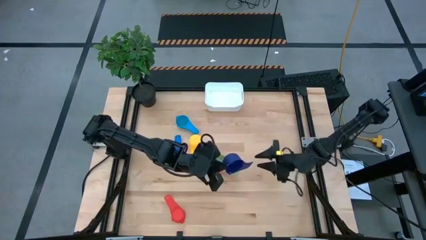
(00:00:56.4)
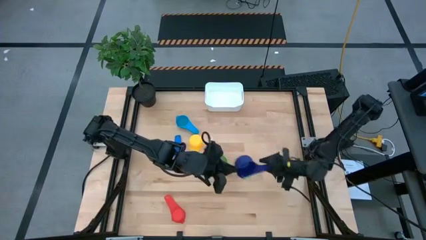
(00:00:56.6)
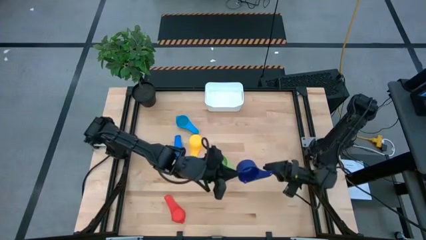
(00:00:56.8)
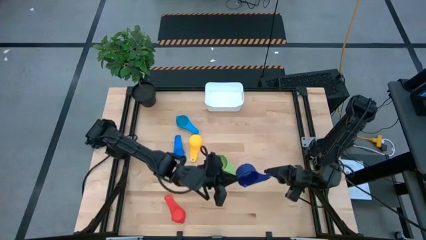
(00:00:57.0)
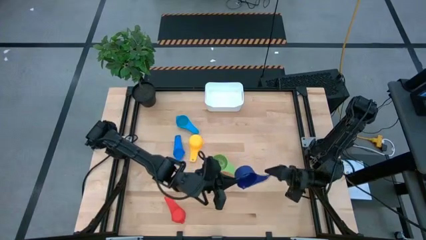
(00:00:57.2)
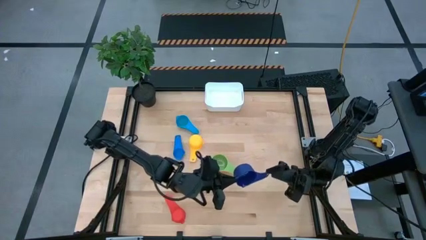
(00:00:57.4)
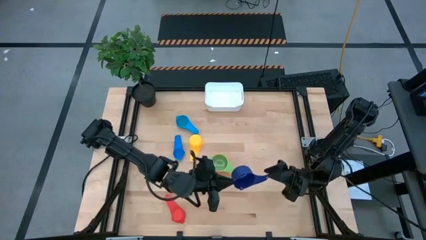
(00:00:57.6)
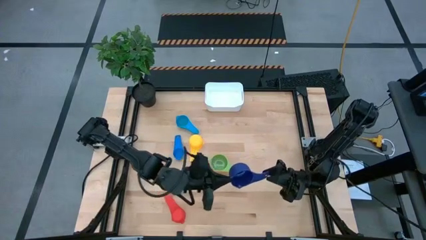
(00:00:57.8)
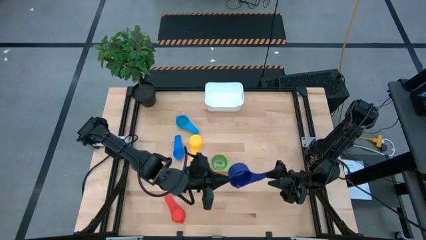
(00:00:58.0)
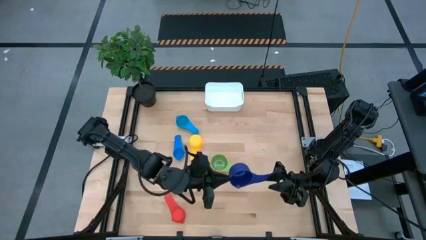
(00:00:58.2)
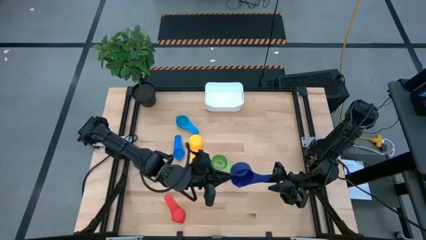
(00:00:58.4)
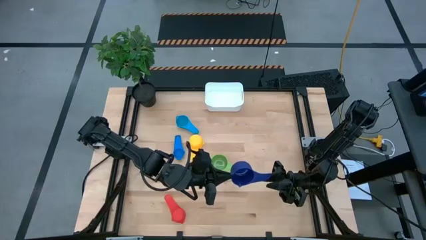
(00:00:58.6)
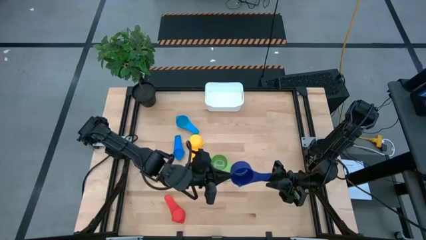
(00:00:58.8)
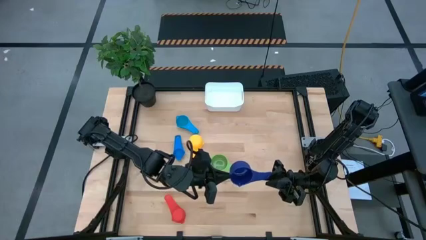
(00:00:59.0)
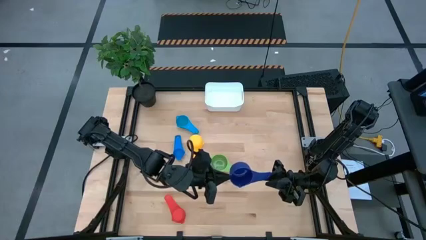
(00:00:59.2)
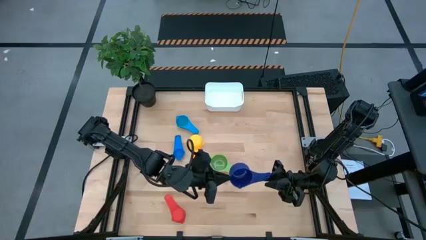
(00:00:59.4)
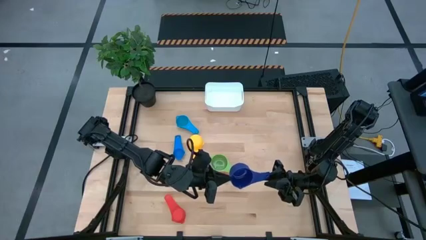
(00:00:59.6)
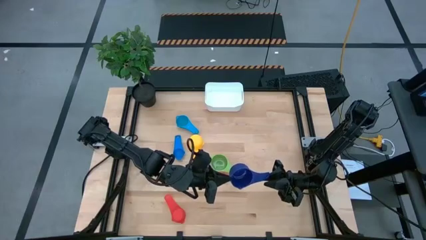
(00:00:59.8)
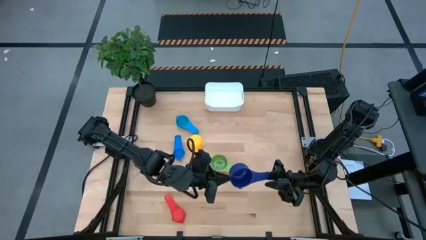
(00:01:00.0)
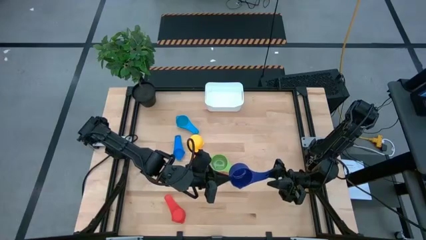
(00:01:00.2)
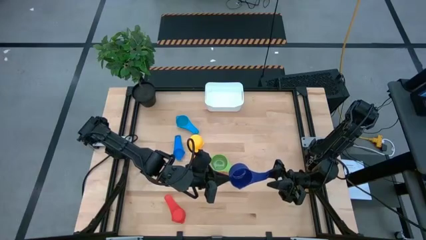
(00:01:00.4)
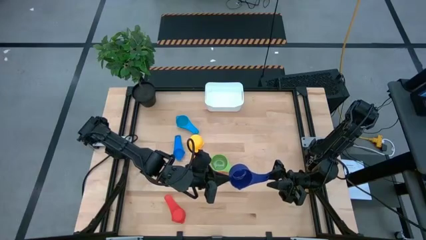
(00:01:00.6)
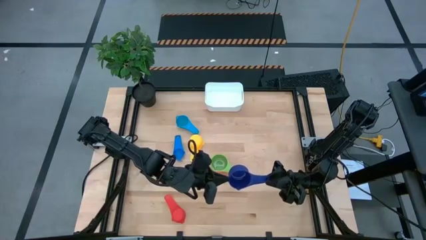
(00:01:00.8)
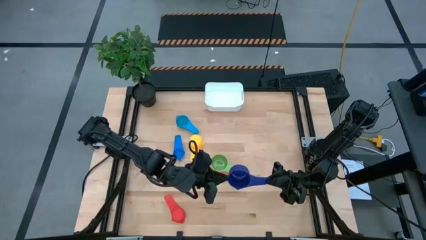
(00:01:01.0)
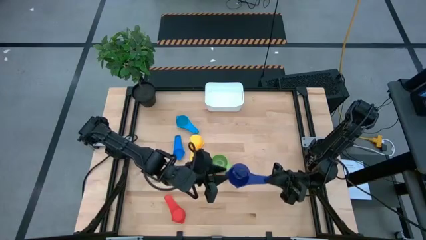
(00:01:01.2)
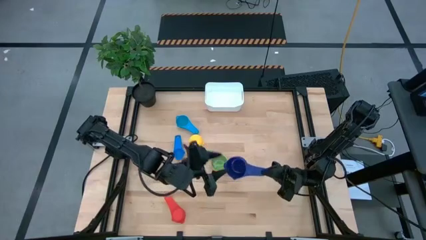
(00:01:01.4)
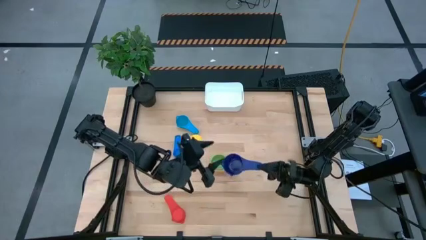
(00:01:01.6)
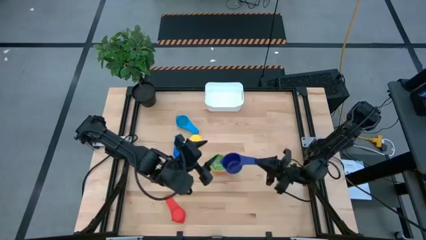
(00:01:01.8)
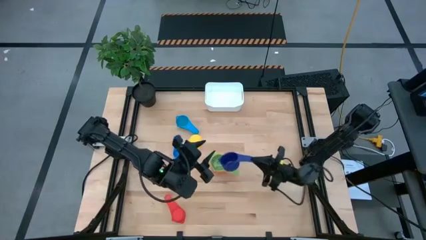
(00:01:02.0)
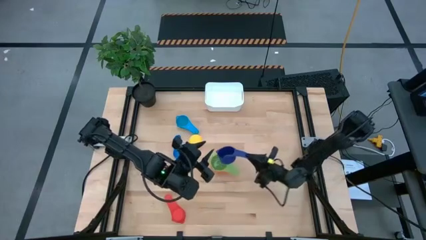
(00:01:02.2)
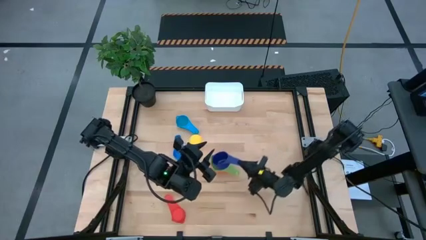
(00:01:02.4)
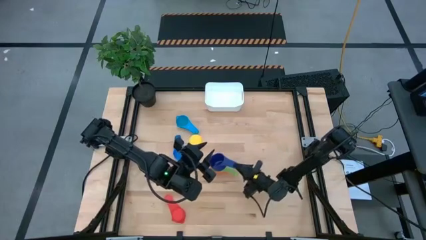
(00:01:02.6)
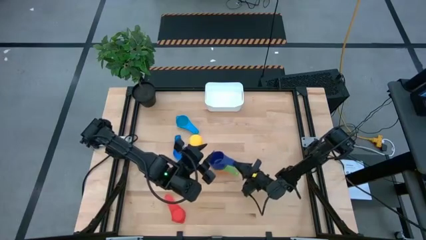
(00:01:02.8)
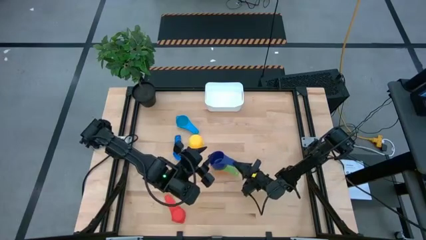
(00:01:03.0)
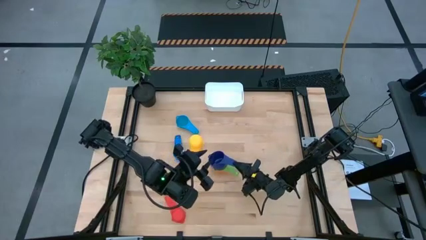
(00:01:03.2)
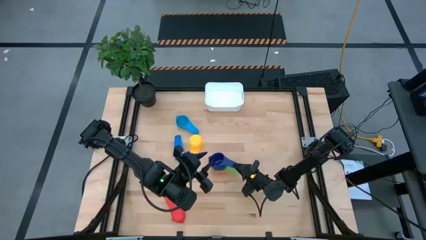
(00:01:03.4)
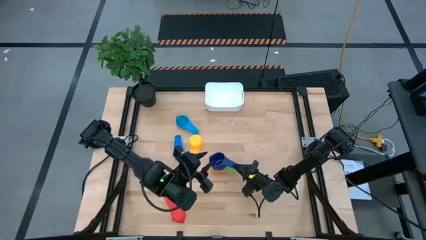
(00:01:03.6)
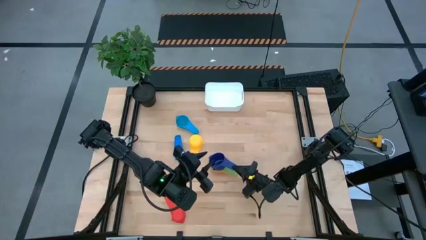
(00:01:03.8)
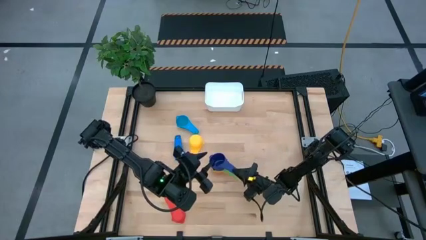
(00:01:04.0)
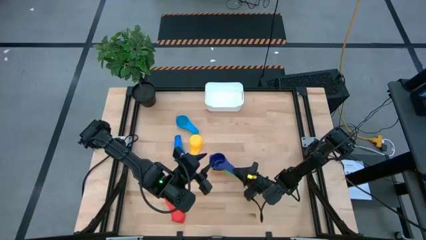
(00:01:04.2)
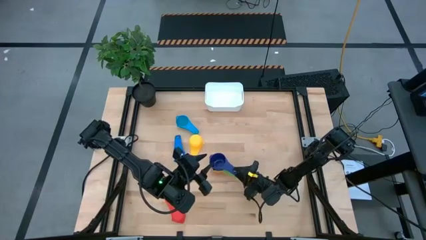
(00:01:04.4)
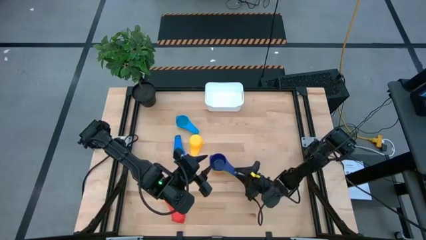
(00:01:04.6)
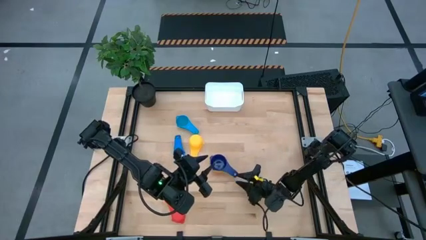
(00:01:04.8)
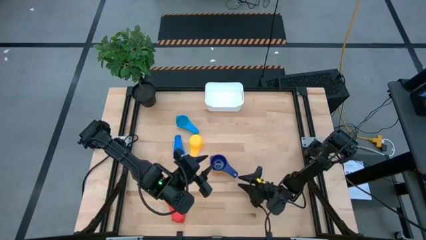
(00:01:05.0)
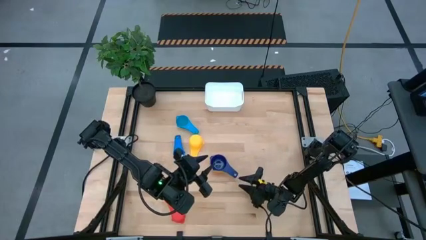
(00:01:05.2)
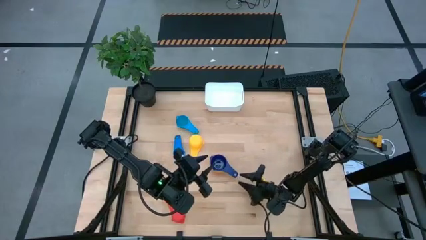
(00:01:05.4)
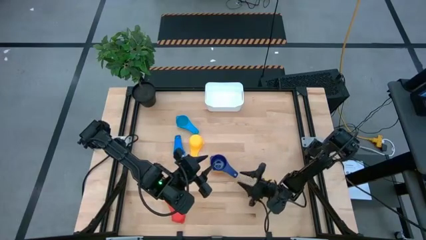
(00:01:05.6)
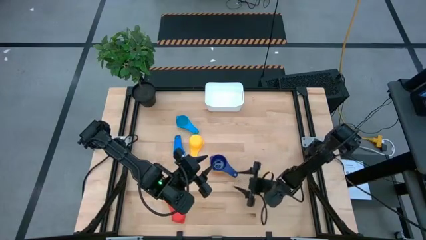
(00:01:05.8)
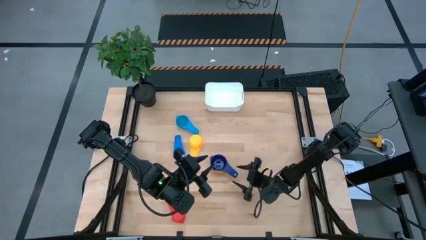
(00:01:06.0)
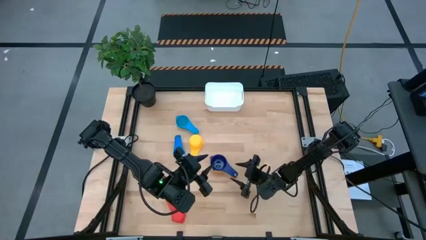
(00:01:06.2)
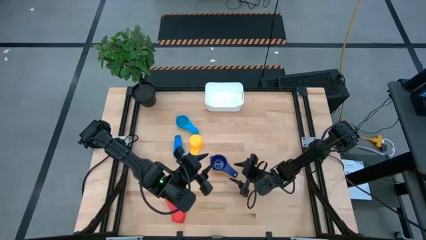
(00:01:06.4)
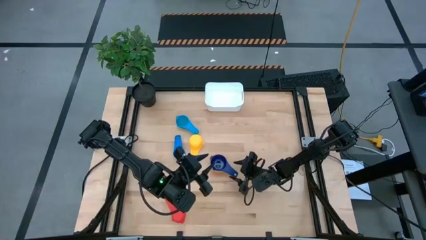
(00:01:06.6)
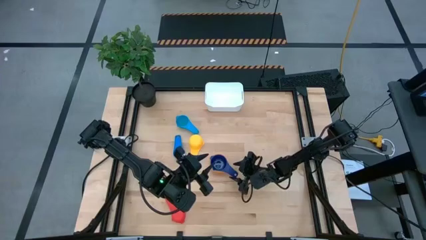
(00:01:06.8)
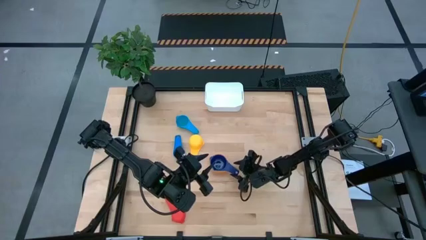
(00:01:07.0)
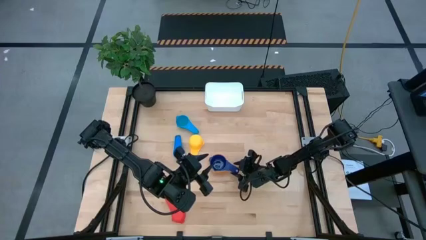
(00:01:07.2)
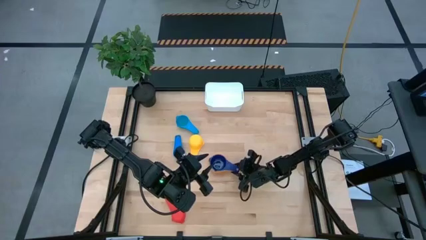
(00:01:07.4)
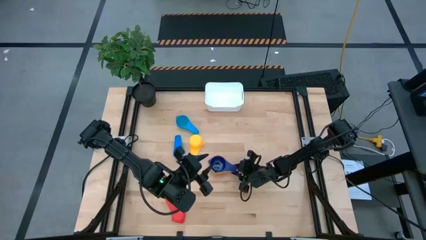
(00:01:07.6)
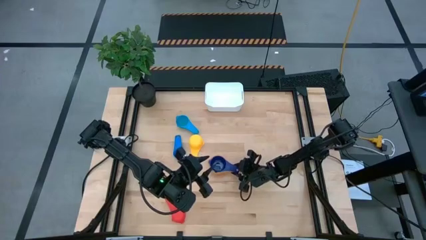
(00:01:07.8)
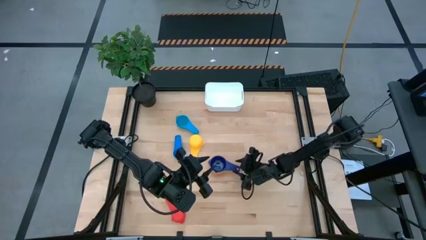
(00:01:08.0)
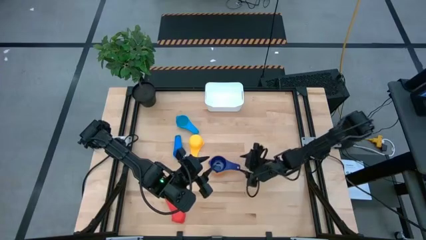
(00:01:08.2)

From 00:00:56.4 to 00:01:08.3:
Task: Nest measuring cups in basket
Stack the dark blue measuring cup on top of the green measuring cup

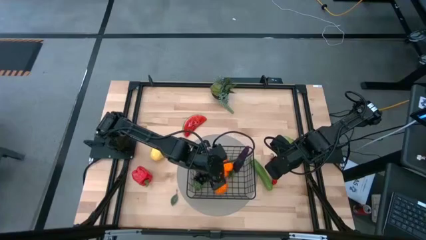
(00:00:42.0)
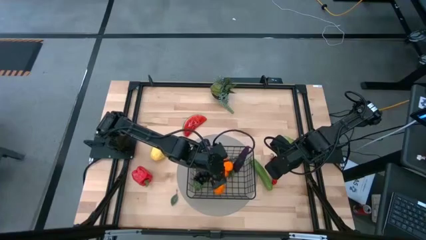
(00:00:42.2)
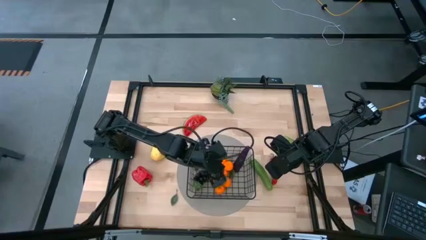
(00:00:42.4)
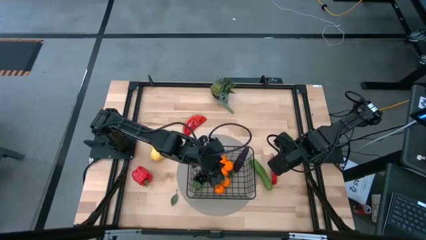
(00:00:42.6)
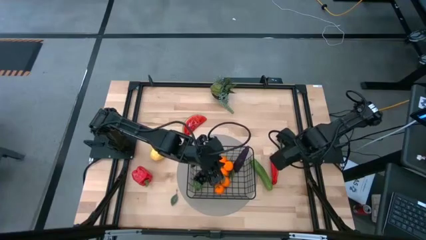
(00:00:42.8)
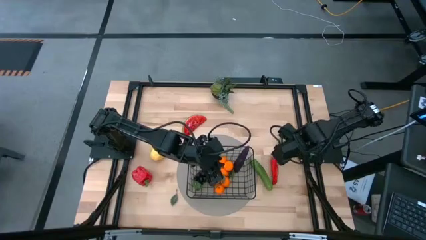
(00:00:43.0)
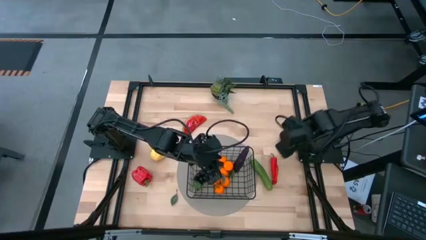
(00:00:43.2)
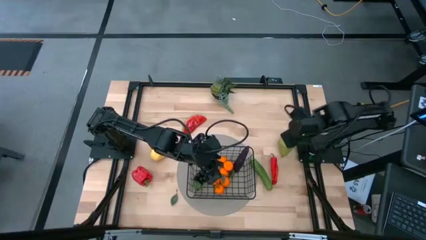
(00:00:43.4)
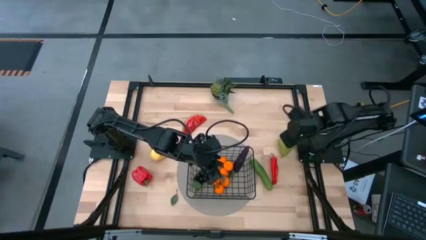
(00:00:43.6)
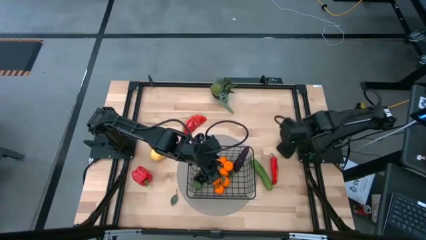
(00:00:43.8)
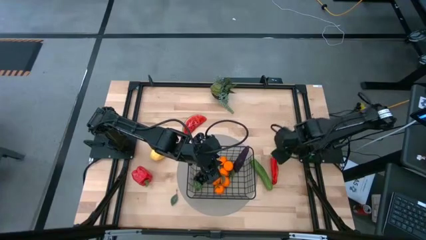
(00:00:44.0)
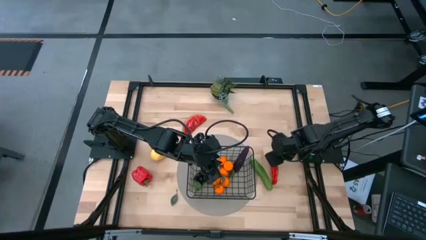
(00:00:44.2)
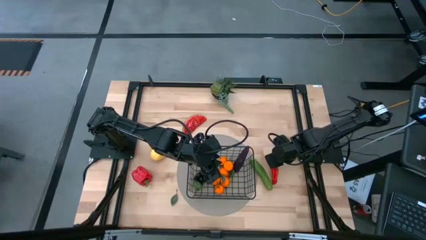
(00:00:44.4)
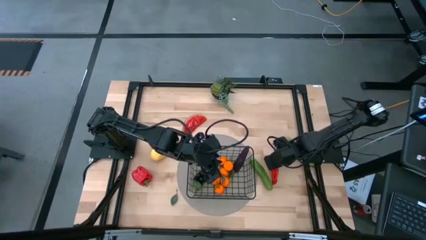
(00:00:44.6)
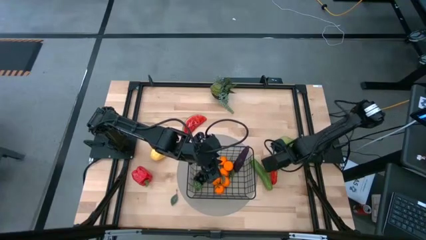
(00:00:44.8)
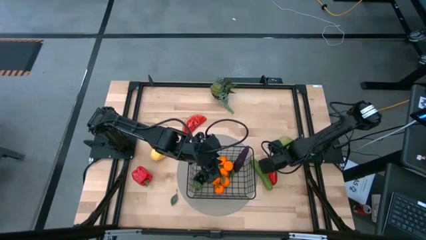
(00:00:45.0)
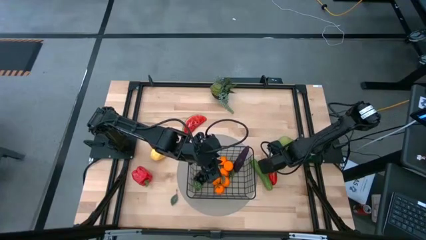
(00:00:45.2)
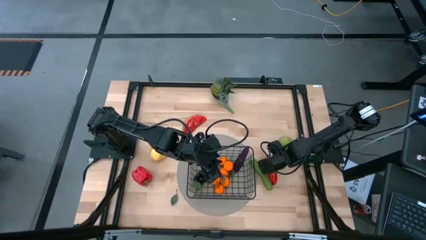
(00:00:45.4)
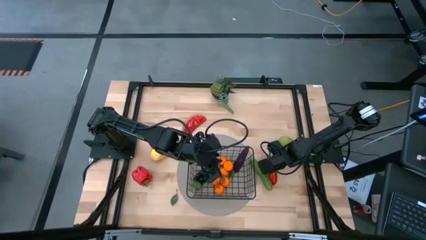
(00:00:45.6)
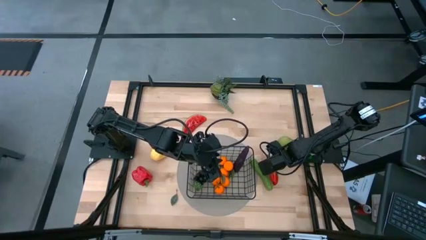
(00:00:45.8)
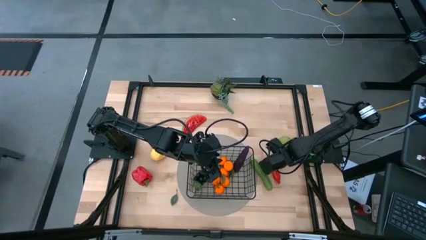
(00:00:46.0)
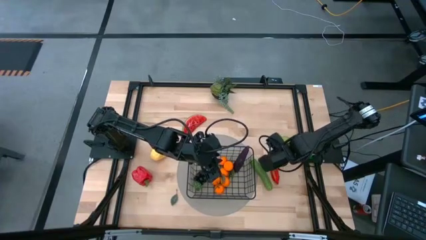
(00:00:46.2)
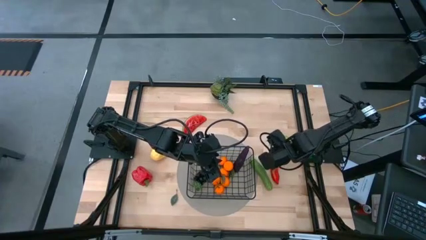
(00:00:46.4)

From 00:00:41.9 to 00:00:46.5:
Task: Build produce basket
Put the red chili pepper into the black wire basket
